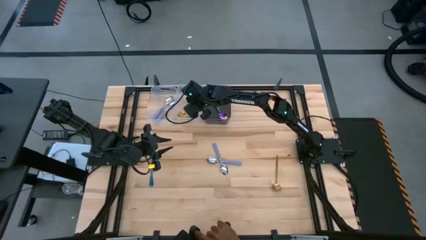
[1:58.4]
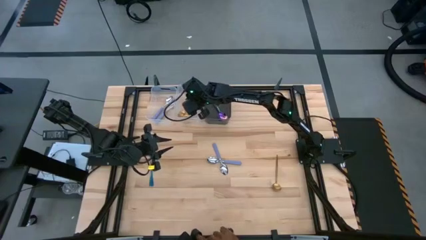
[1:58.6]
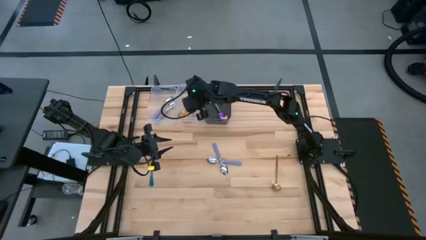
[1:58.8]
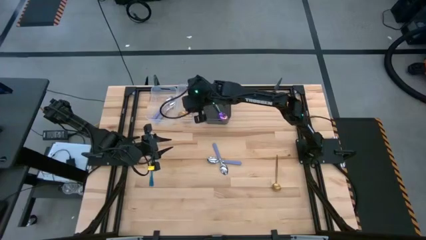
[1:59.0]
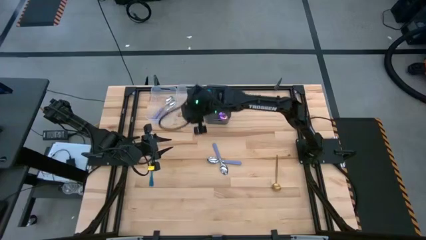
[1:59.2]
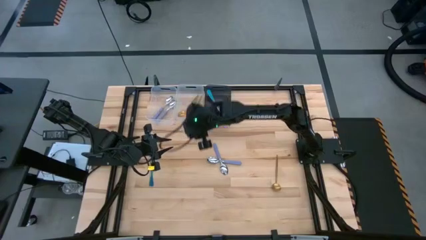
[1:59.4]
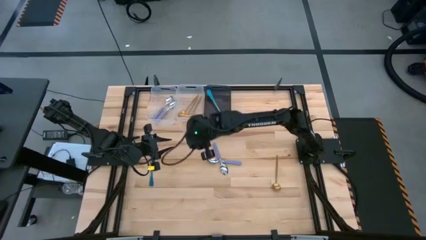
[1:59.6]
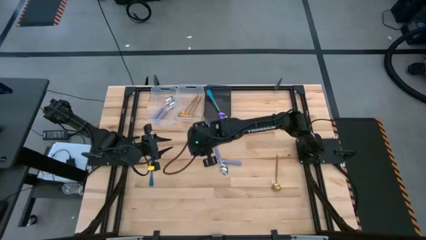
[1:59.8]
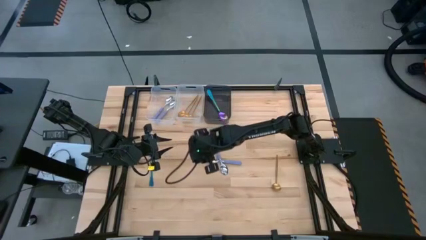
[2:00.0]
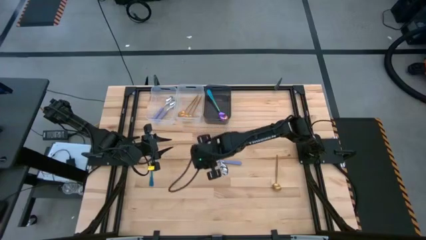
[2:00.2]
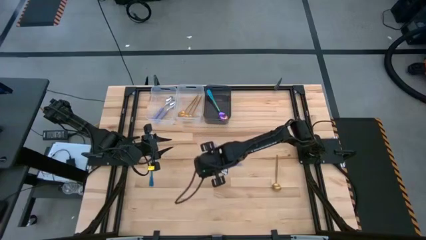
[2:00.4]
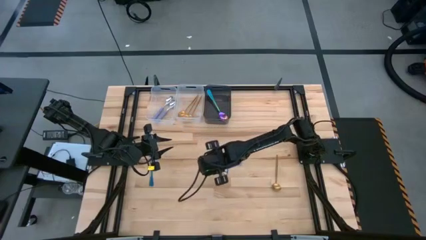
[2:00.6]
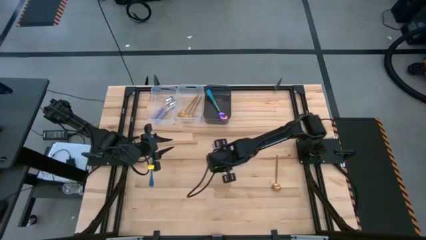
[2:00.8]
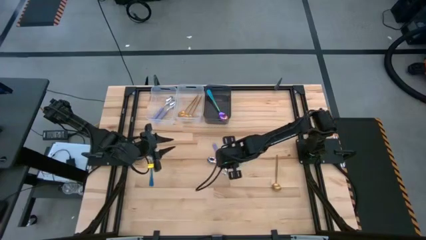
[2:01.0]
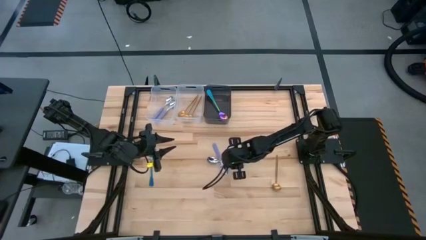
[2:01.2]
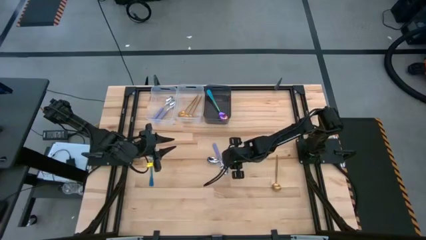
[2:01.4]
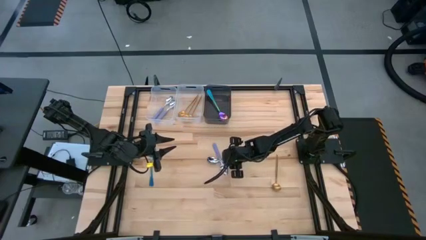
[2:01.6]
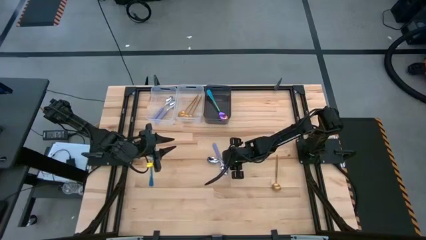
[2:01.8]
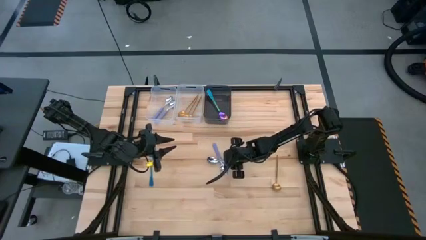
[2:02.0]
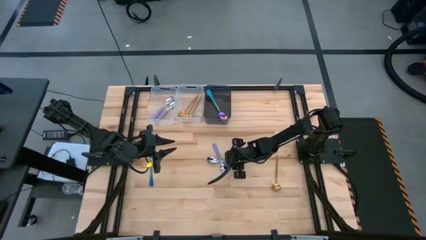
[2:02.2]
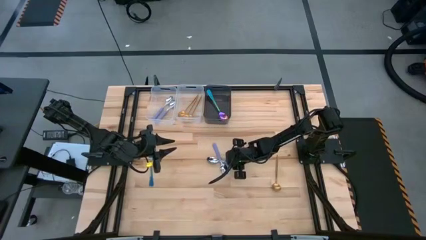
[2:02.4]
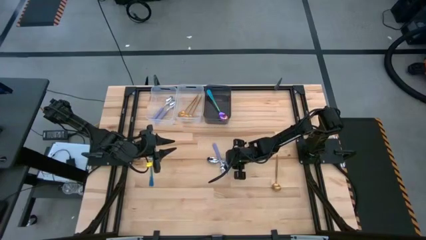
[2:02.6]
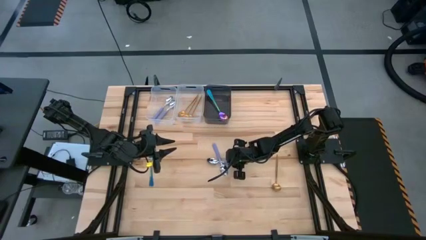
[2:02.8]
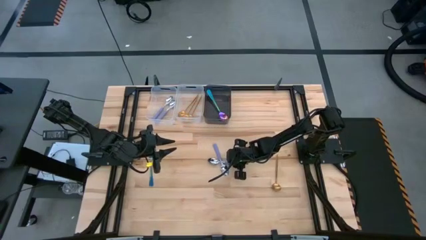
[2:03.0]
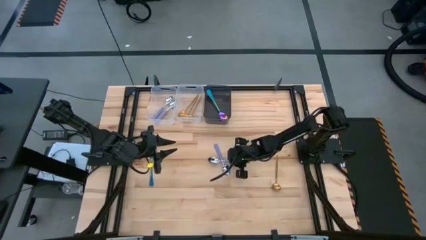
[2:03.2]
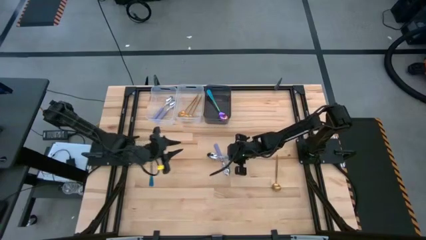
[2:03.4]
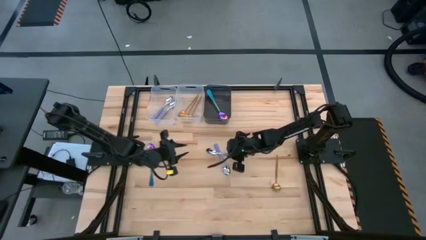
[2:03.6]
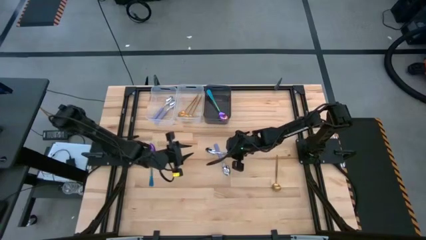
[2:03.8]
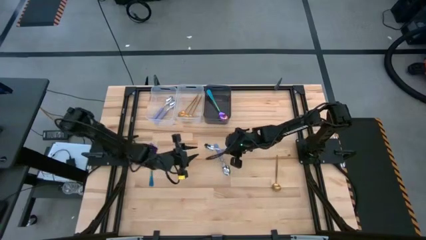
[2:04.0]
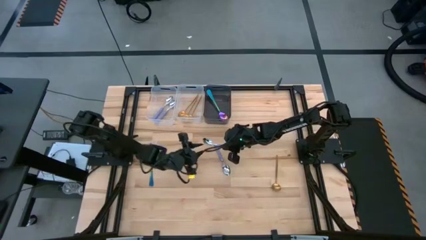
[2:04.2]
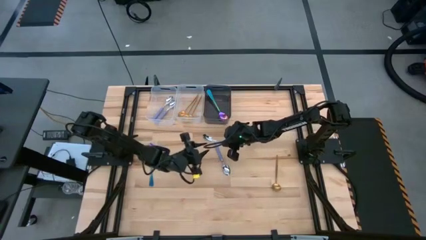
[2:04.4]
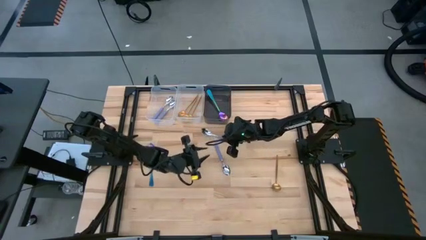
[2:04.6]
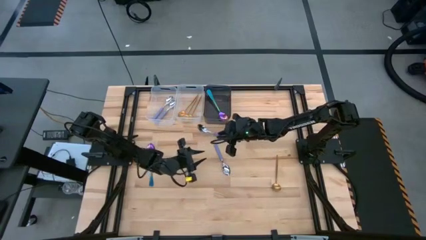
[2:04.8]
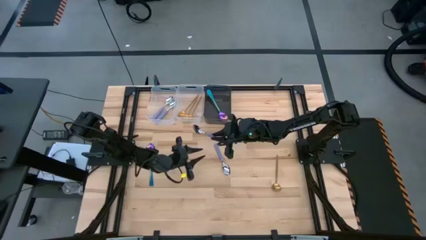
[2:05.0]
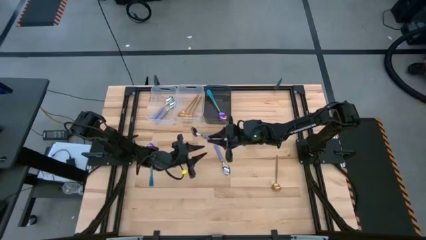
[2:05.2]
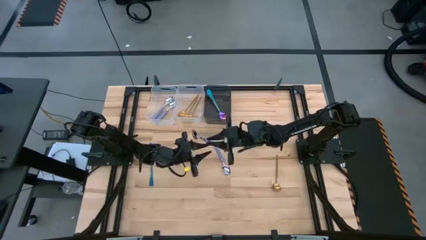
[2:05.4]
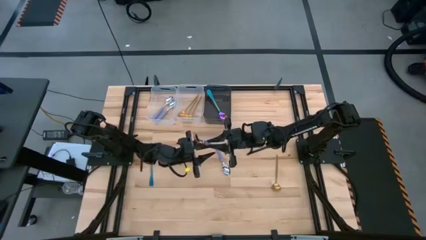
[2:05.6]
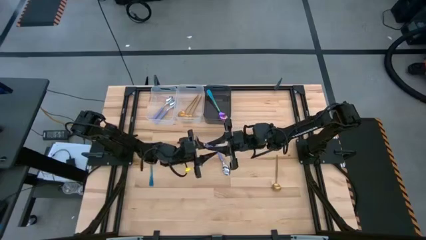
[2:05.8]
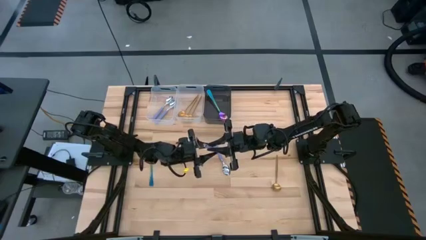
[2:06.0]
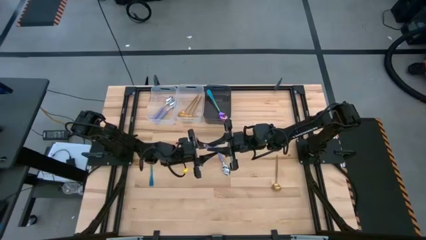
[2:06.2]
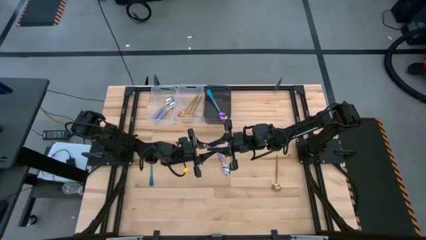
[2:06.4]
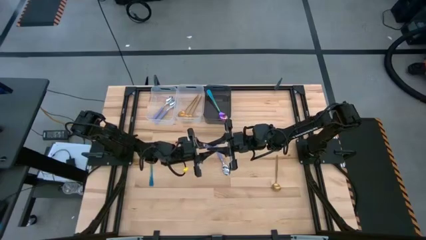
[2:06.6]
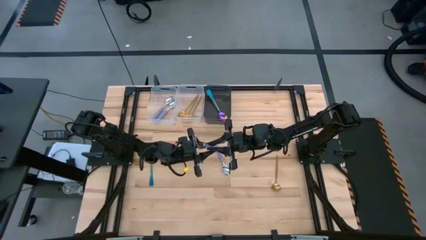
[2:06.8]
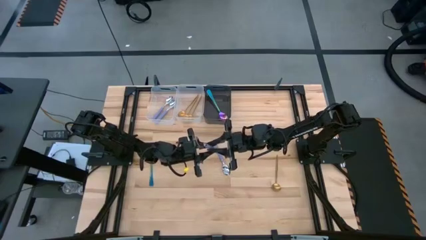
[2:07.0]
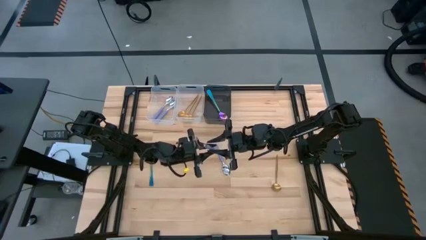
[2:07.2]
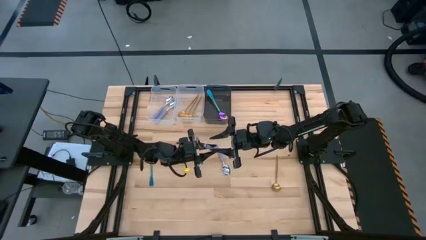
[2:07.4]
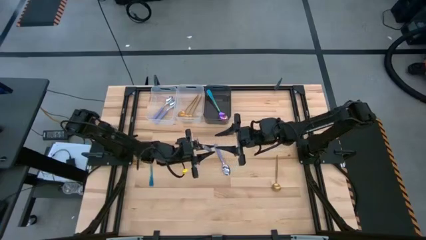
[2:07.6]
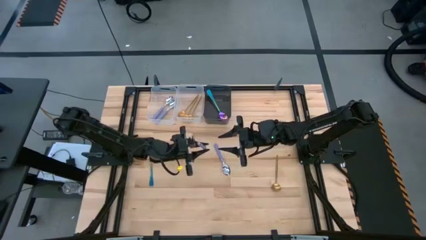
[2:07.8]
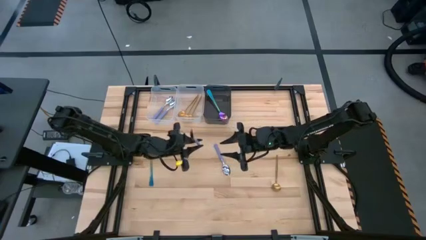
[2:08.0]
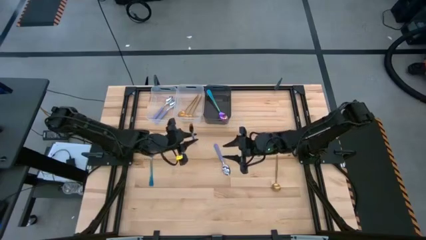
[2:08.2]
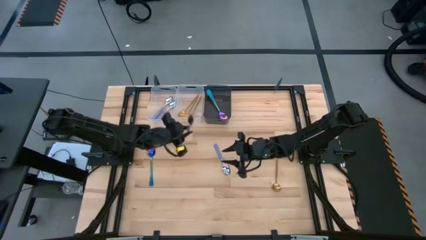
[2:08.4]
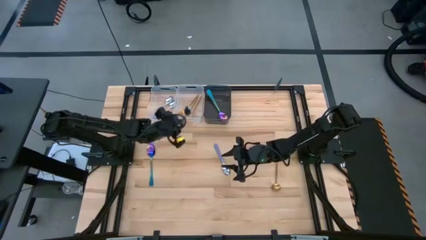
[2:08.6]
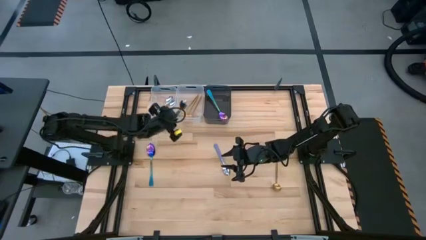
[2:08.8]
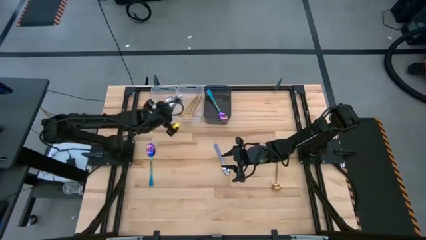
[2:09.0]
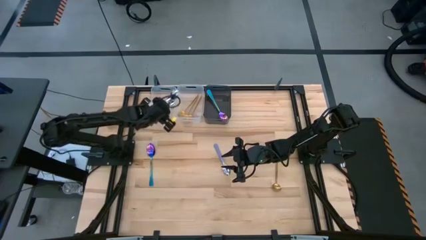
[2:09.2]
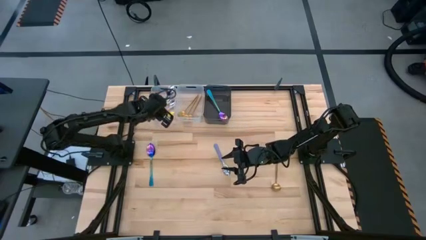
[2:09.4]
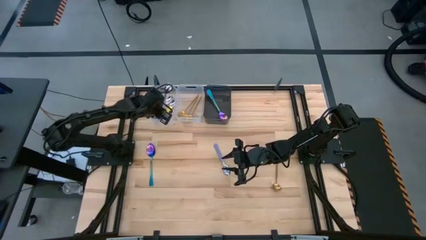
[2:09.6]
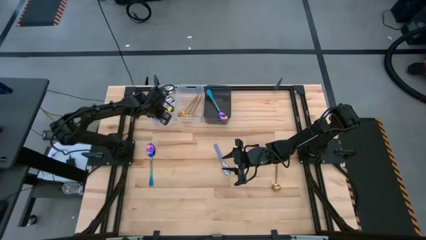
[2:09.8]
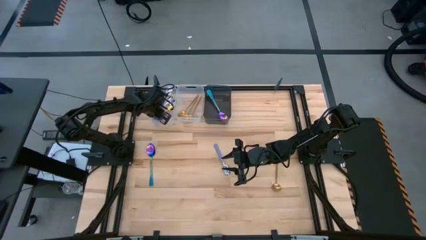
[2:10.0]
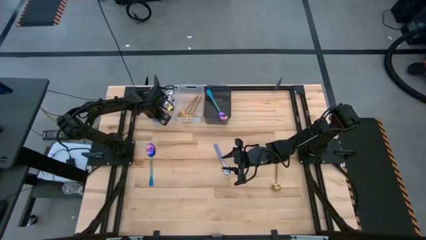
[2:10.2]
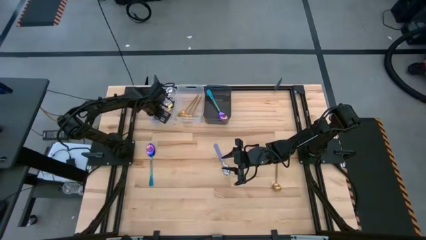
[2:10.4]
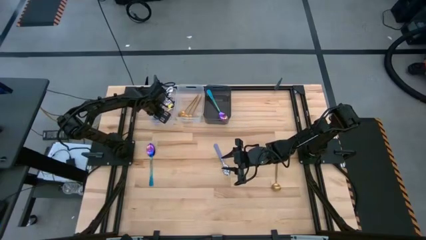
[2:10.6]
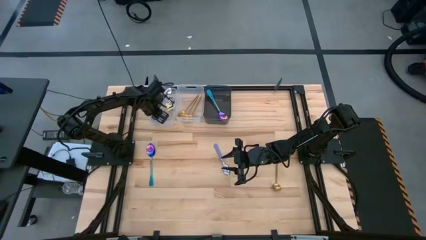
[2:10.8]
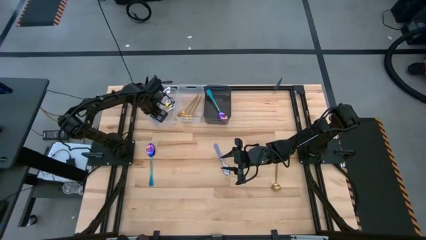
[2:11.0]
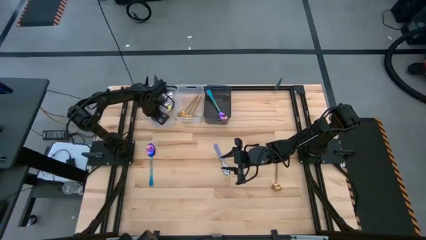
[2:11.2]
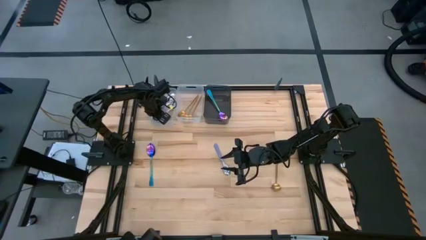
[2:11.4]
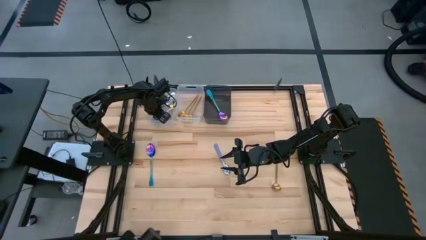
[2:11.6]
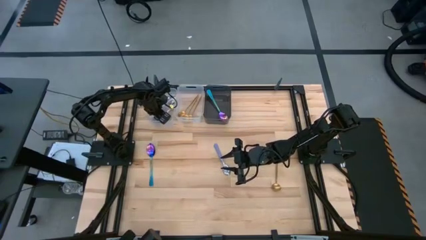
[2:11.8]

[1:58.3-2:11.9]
Task: Sort silverware by color (type)
Put the violet spoon into the left transparent bin

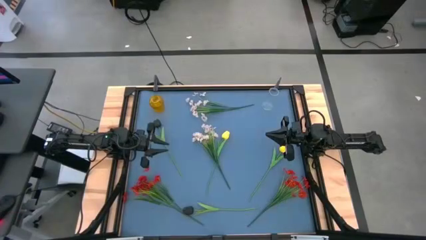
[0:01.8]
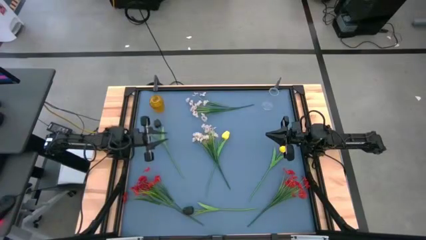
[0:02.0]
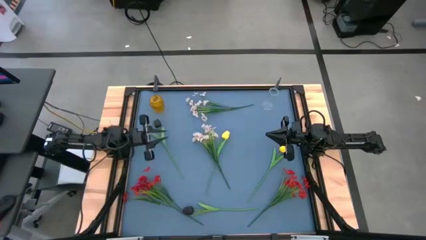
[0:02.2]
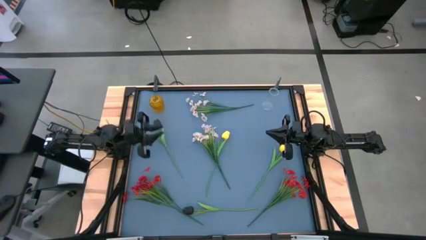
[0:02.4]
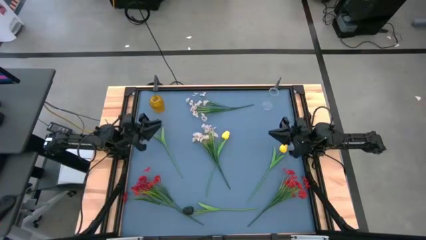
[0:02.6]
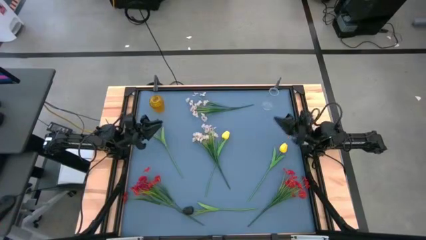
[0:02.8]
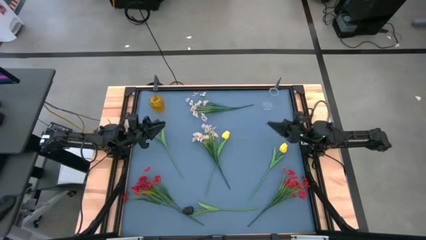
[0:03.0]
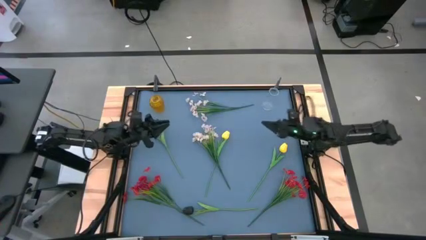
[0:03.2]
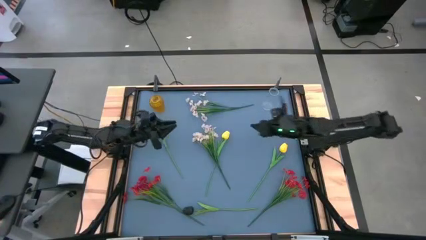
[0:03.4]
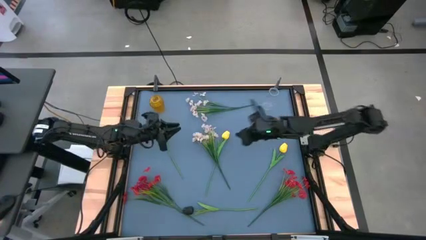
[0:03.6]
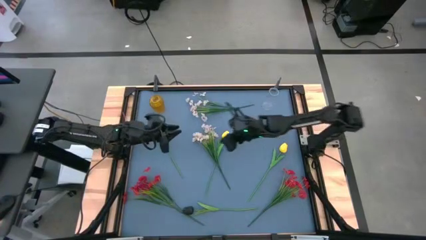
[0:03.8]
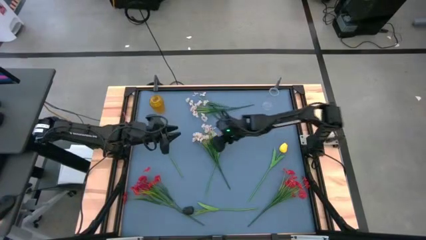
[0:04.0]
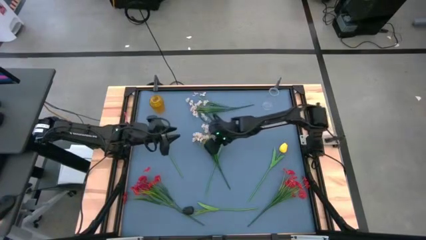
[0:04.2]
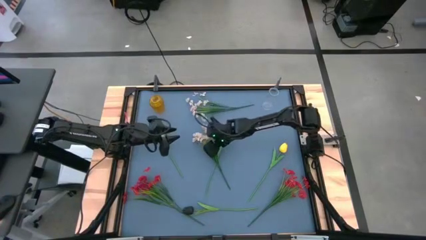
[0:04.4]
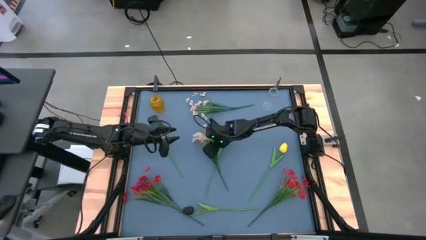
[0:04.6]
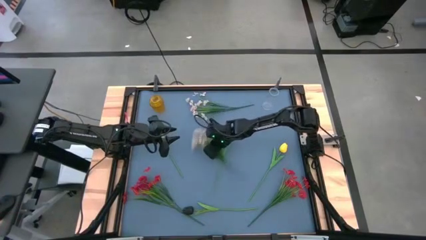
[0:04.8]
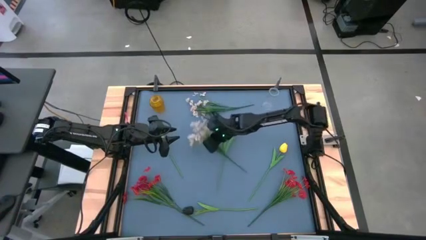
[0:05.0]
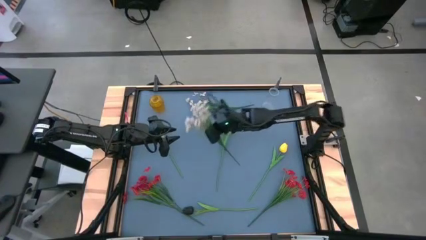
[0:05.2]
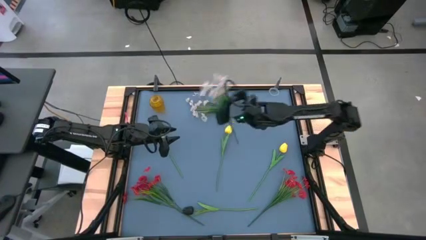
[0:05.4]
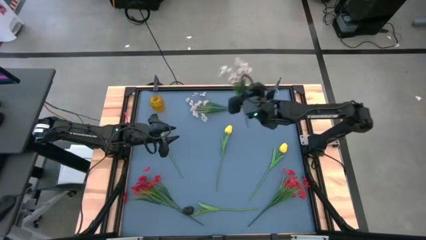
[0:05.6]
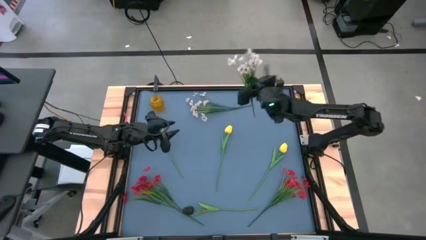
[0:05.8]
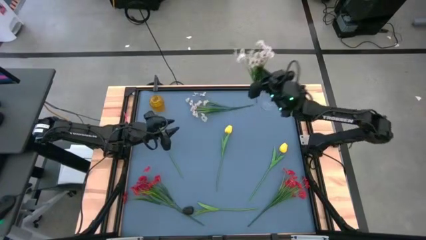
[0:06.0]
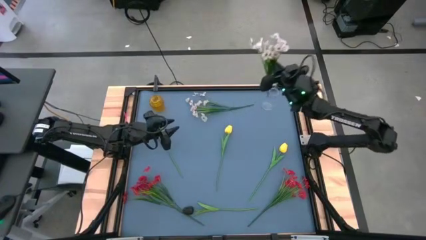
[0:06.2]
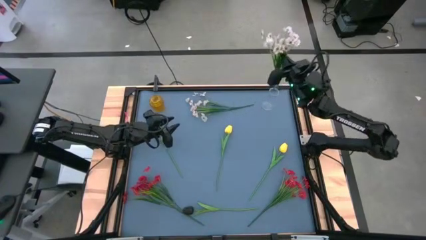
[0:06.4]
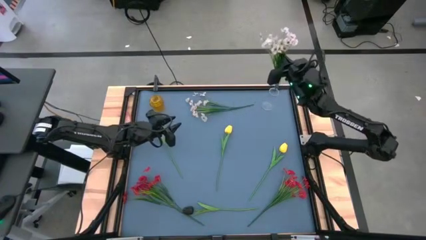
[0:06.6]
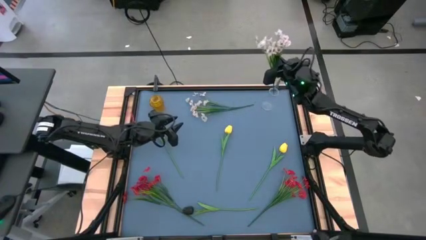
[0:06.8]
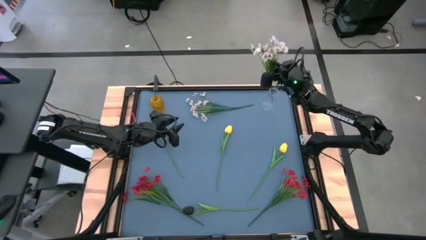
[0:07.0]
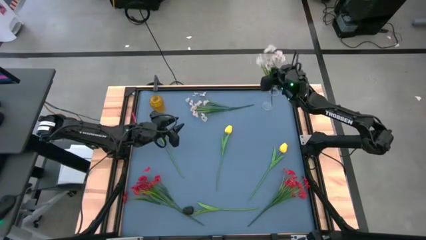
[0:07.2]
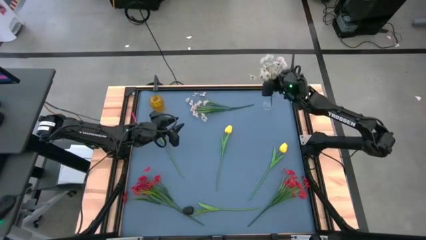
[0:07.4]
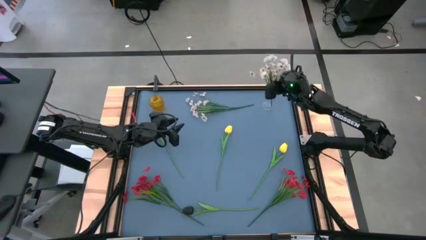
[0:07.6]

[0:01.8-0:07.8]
Task: Sort flowers into vase by color
Put the bottom white flowers into the transparent vase
